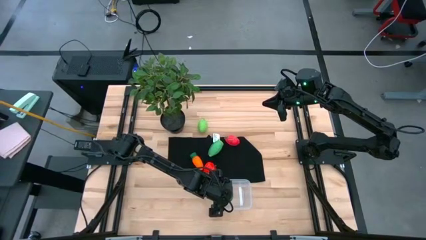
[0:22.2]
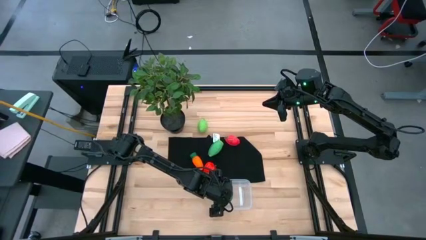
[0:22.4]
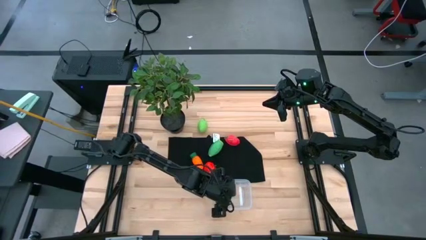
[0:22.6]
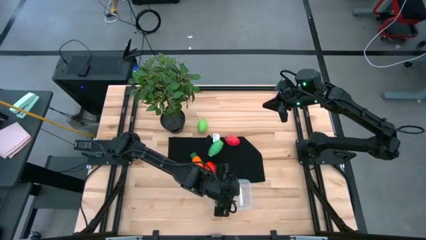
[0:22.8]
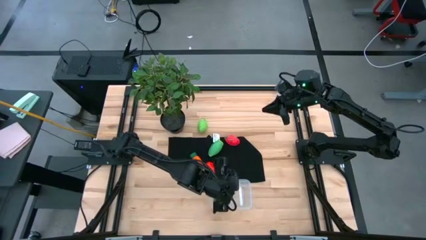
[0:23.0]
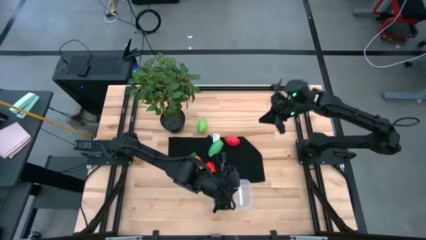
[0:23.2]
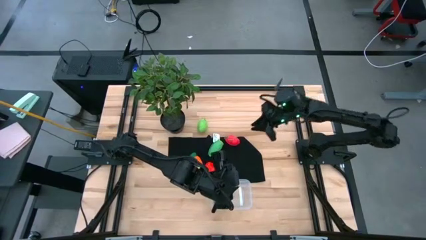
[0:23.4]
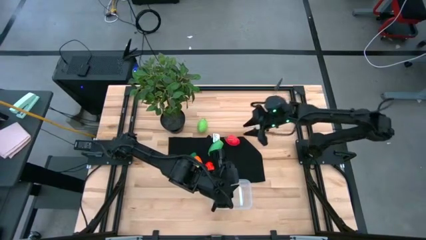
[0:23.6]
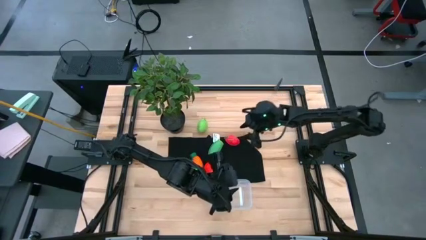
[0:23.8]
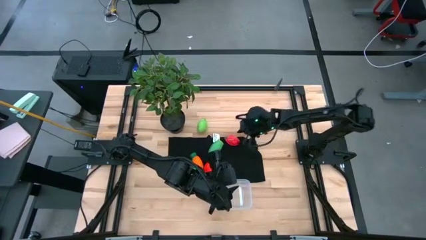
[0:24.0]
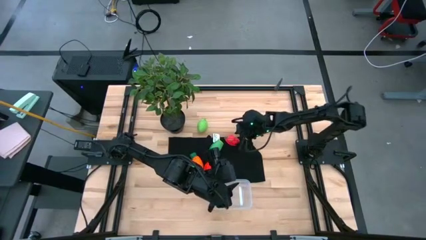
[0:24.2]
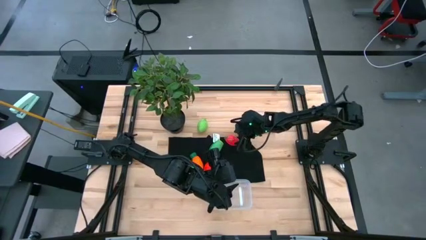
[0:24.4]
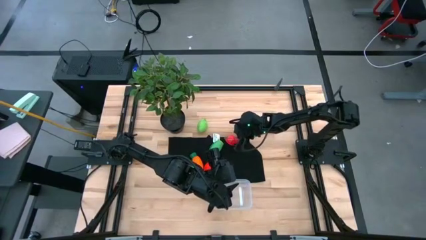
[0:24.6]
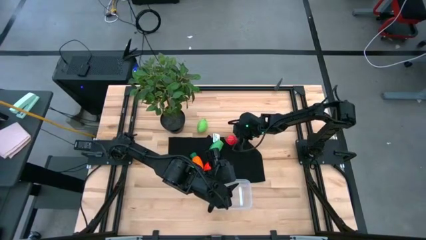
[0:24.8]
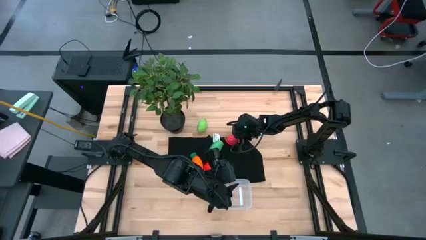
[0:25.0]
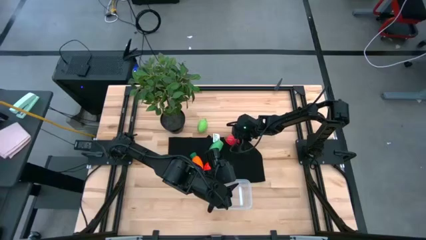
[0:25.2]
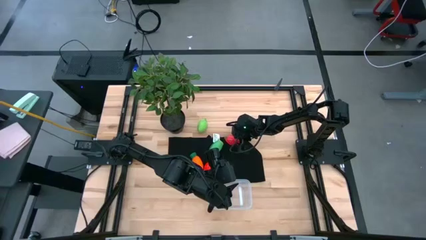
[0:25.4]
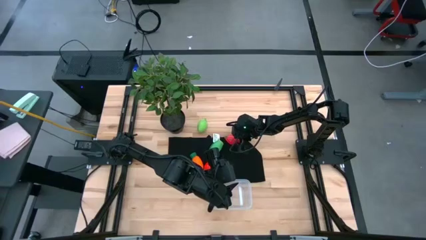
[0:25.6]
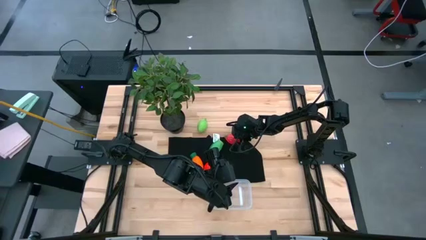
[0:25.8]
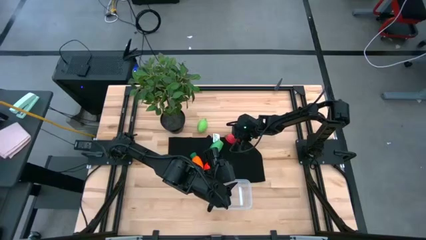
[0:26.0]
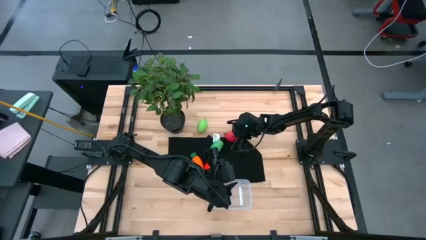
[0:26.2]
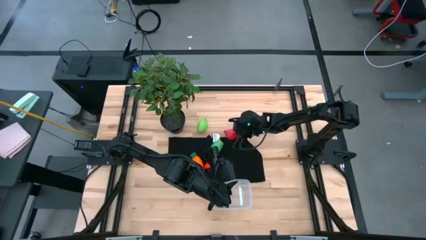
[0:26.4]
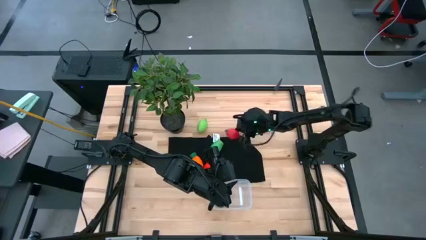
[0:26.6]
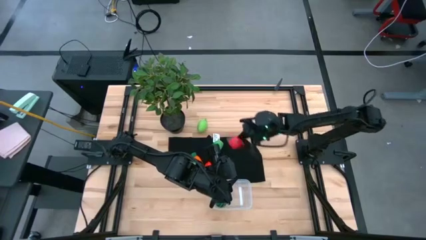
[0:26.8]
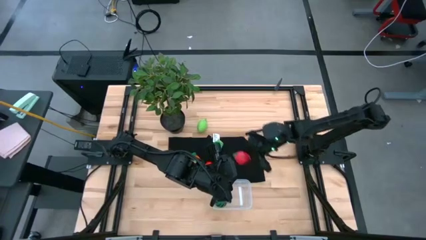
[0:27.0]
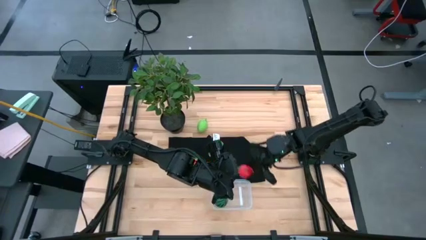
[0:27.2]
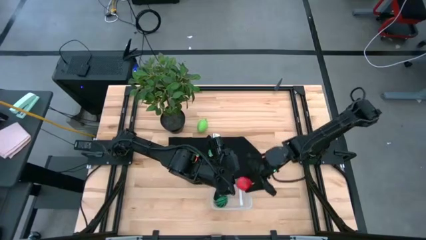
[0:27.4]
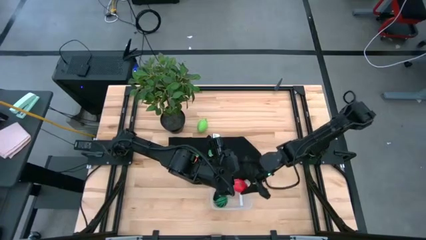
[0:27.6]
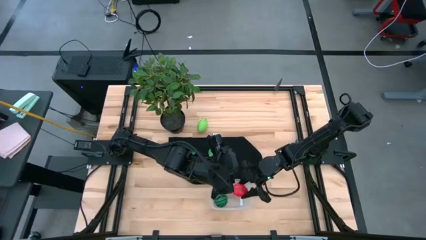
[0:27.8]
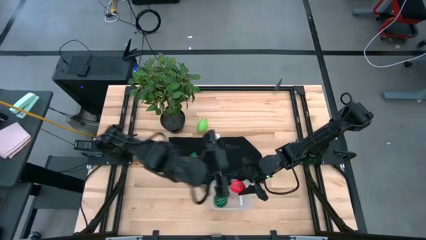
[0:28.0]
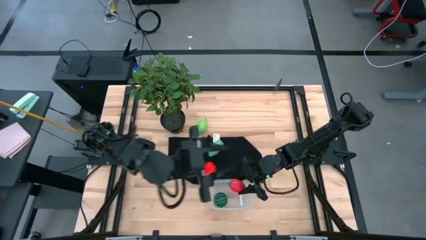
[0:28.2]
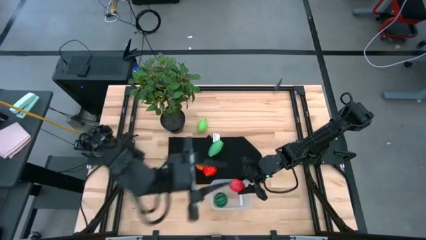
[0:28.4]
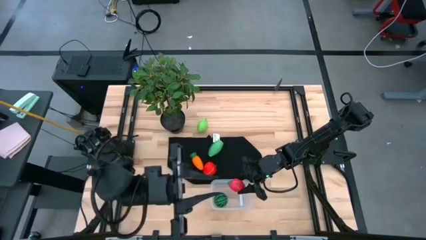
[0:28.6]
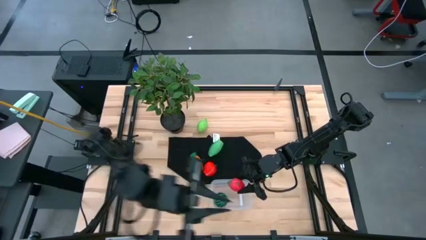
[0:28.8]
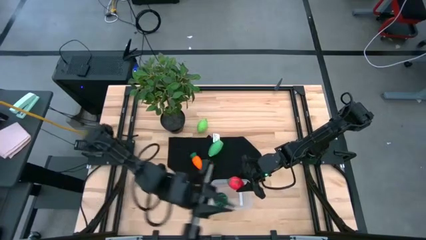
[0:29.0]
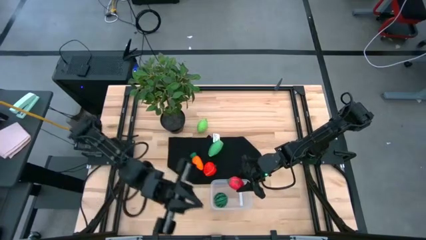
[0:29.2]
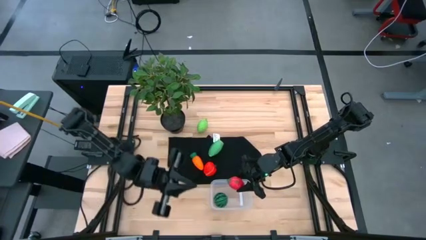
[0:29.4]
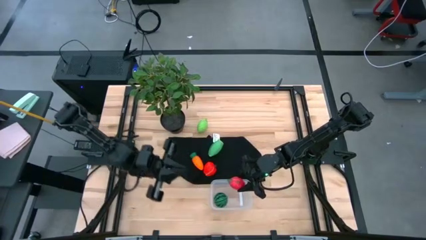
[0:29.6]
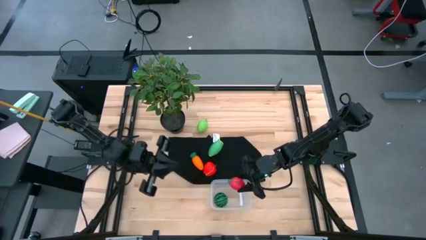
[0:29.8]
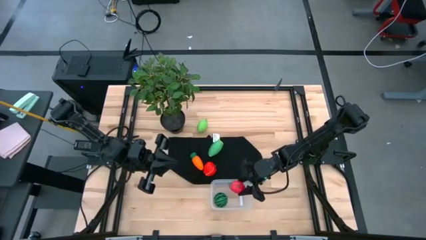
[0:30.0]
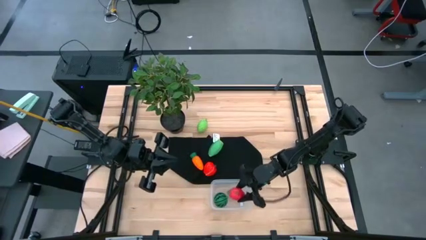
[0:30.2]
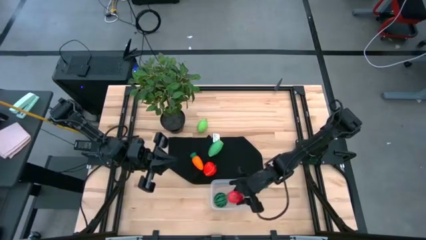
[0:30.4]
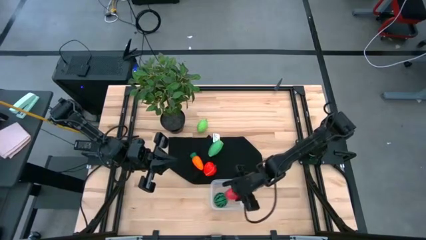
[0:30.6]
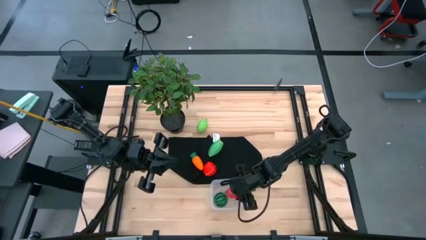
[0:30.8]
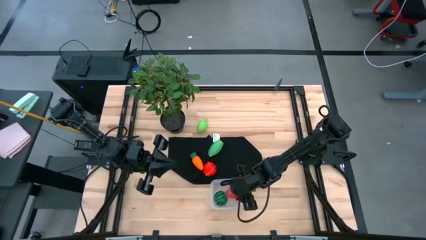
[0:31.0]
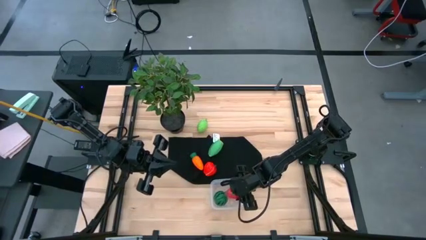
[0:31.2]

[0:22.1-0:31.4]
Task: Pick and placing Produce into tupperware
Put the dragonfruit into the transparent bin

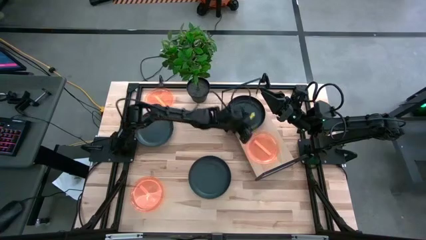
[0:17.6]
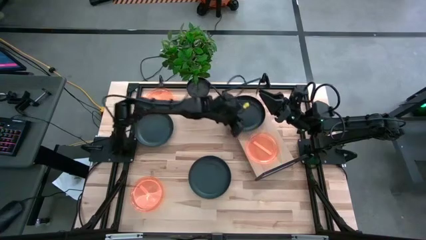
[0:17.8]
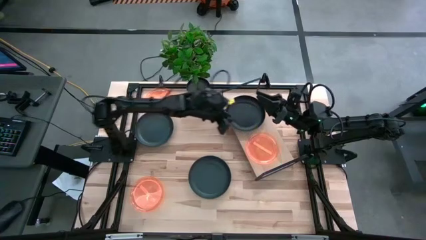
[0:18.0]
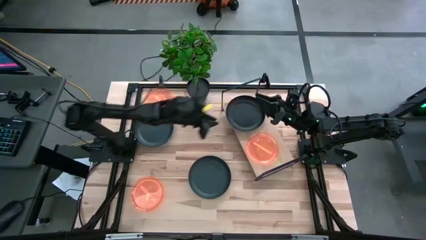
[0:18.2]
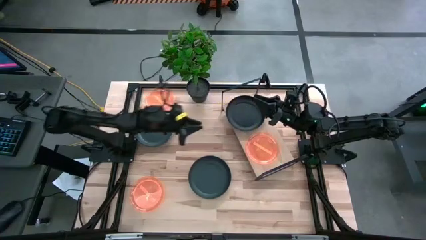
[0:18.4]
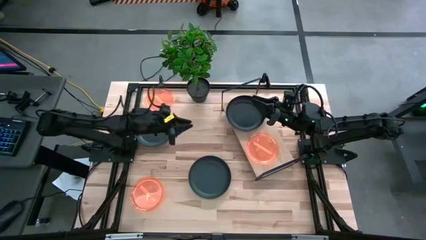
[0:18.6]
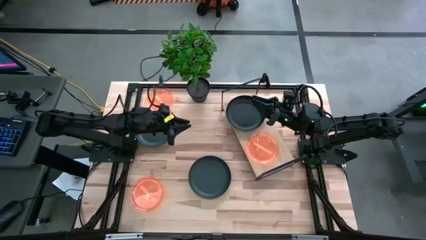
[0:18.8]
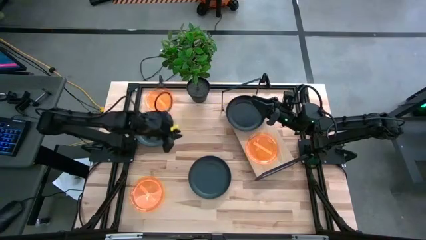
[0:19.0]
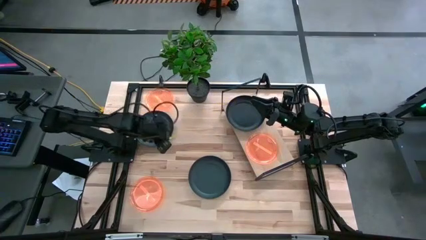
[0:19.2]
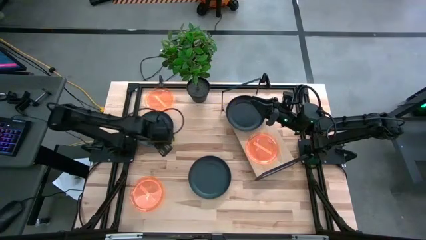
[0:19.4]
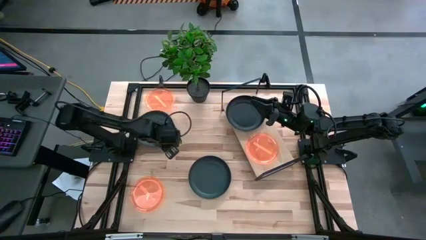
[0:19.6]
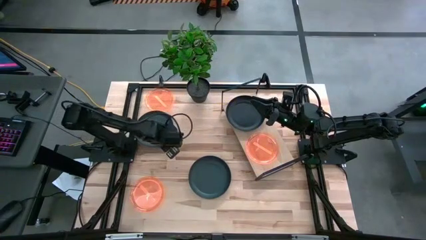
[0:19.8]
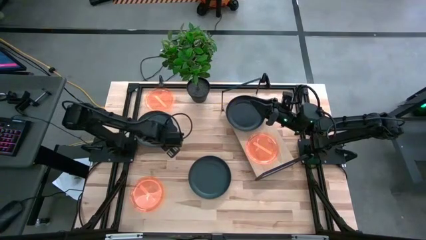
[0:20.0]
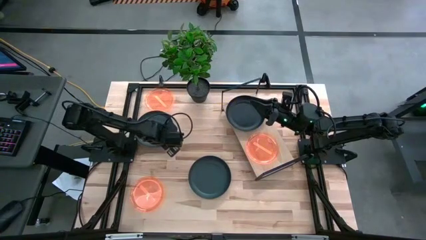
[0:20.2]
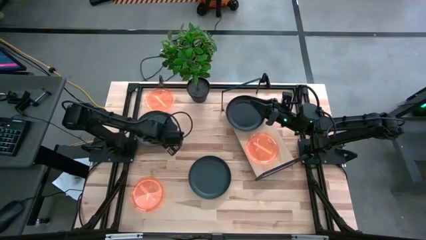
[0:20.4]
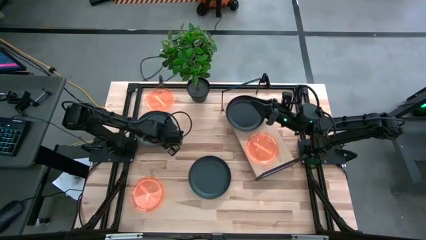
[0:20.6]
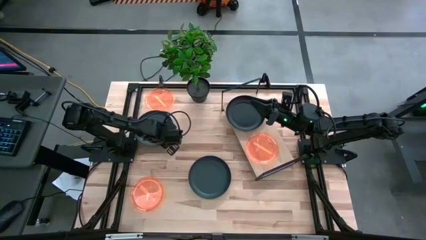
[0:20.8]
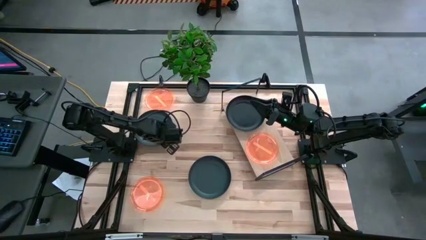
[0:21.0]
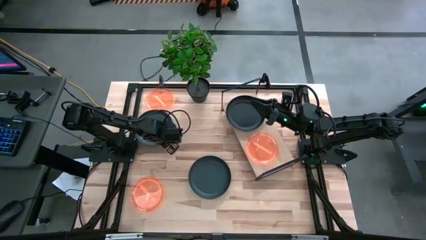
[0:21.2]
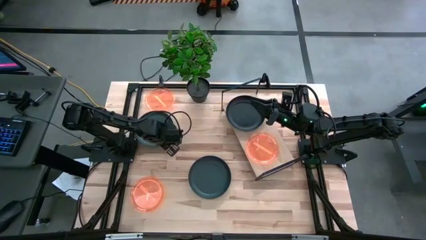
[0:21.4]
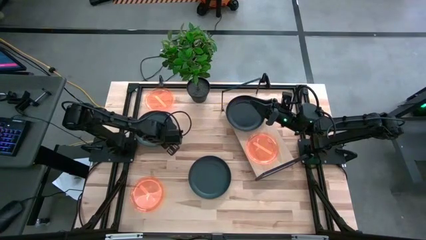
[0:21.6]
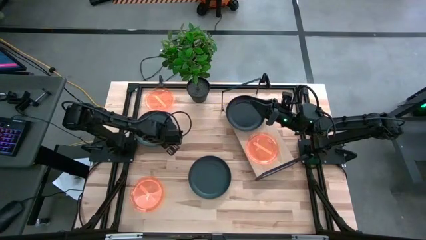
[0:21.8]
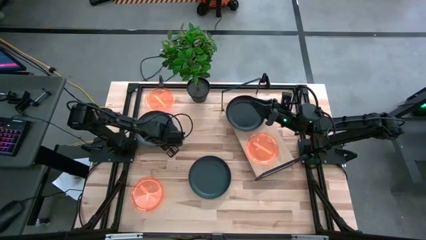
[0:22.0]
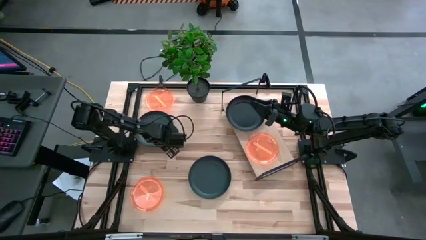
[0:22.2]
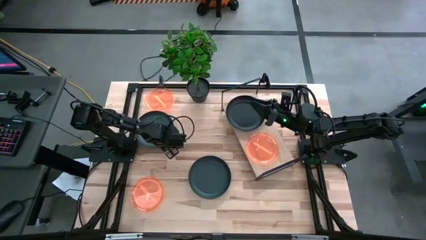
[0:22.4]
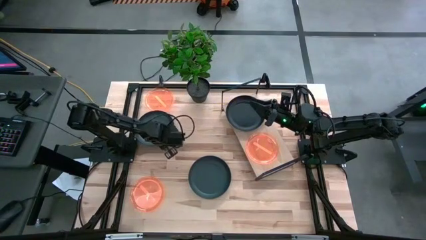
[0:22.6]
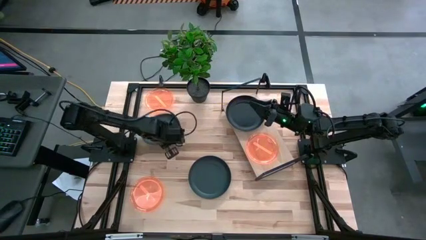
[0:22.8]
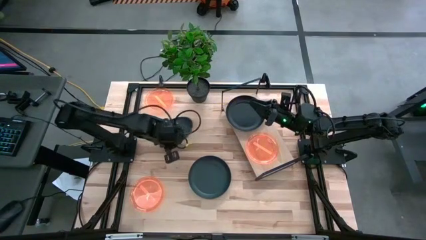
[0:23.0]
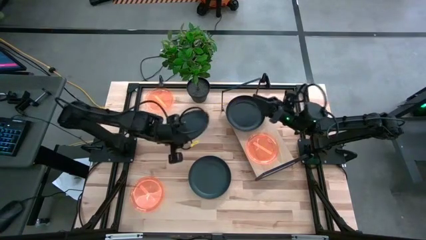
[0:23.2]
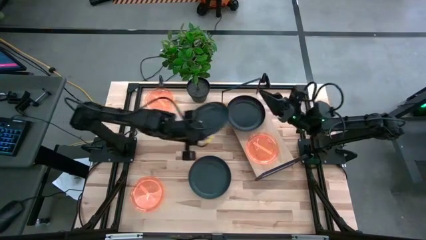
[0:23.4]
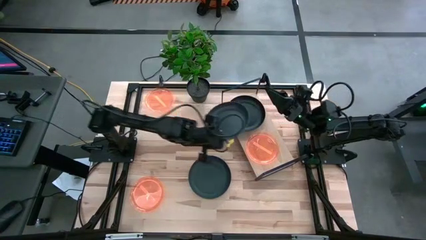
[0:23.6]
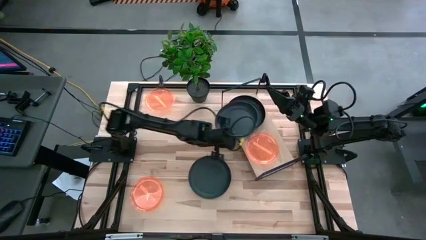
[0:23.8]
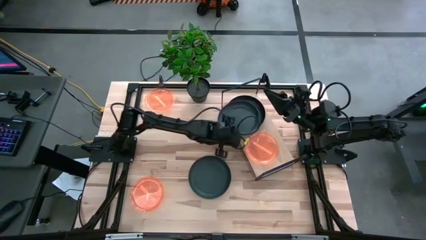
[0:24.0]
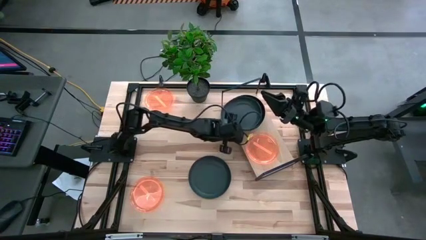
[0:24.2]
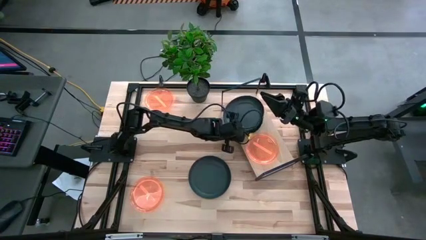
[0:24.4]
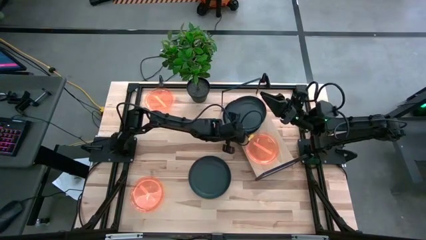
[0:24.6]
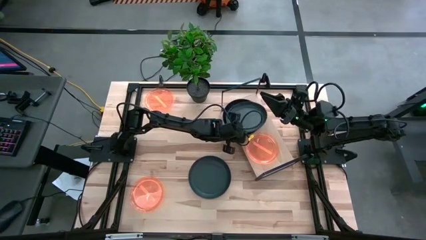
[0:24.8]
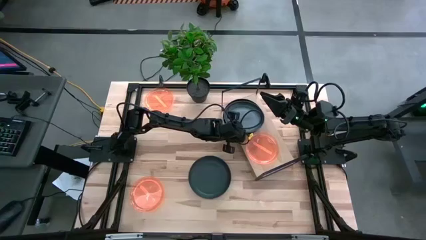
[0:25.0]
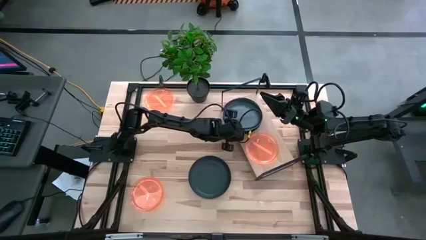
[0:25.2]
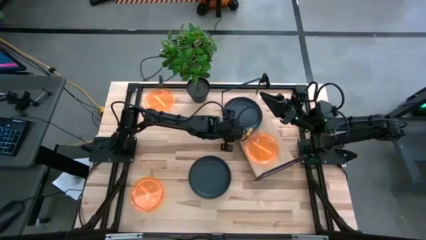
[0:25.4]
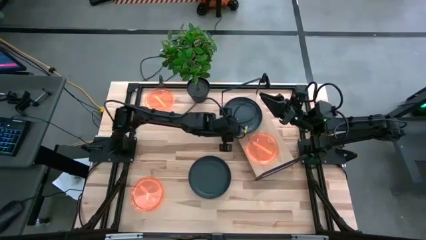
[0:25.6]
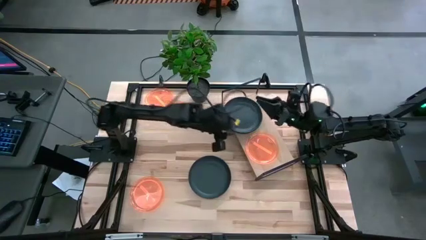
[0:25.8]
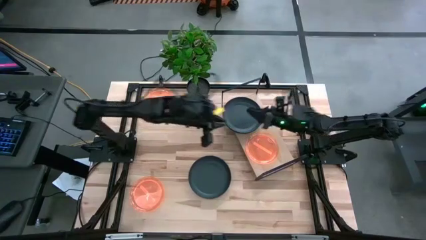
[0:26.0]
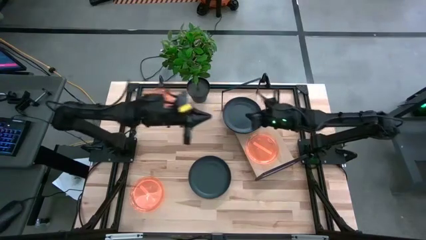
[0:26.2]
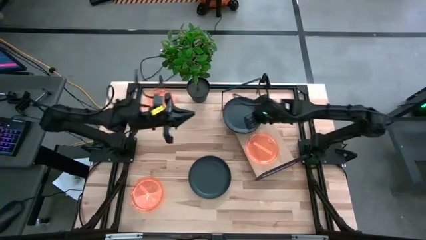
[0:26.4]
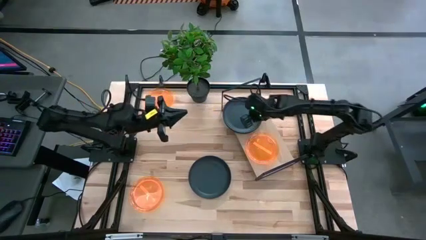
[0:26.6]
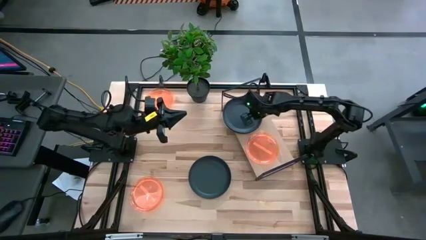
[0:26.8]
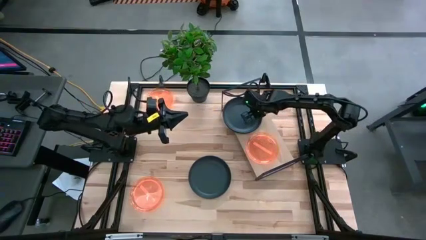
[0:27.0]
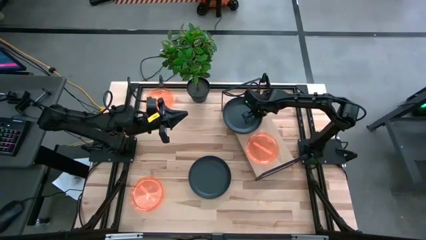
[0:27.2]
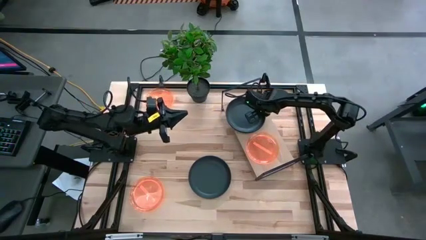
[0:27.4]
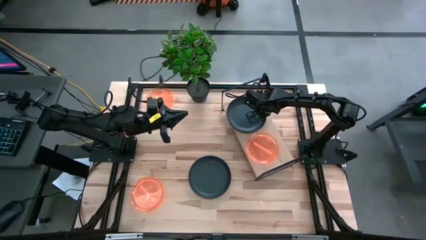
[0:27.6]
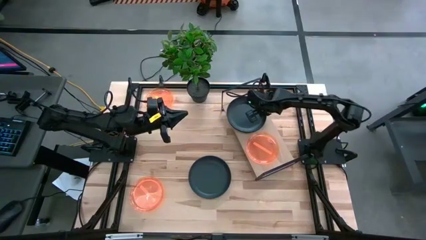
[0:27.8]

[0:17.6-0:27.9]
Task: Place and stack plates onto a shelf
Stack the left black plate on top of the black plate on the shelf
